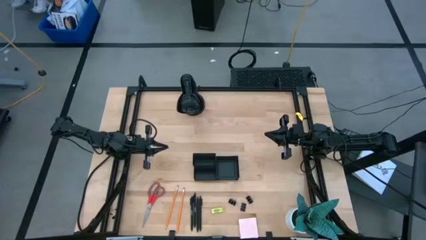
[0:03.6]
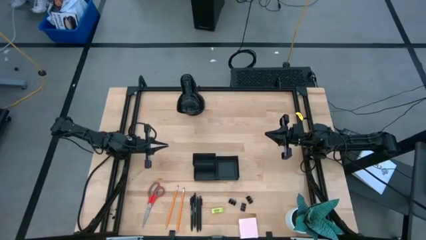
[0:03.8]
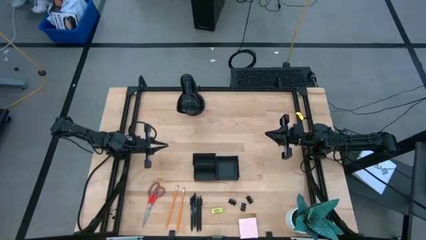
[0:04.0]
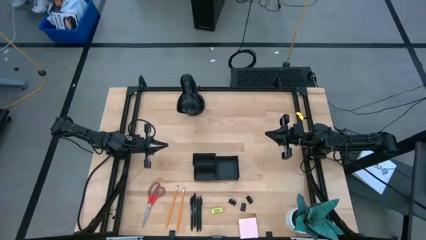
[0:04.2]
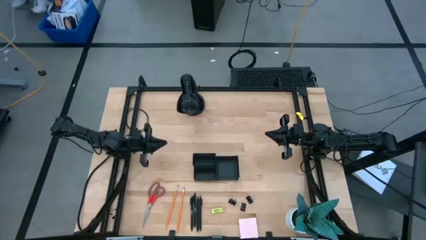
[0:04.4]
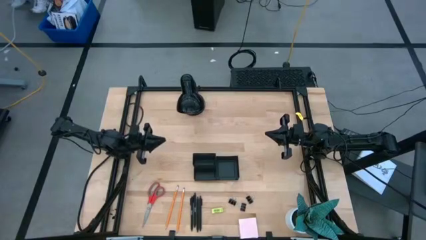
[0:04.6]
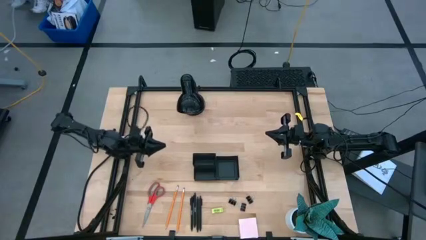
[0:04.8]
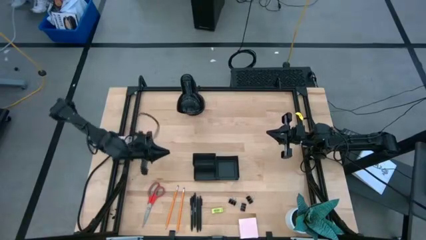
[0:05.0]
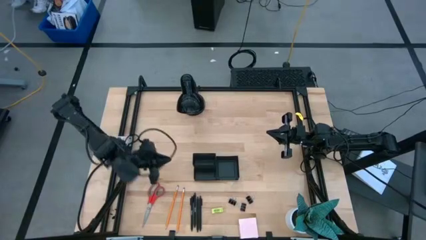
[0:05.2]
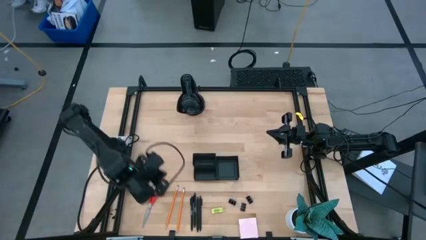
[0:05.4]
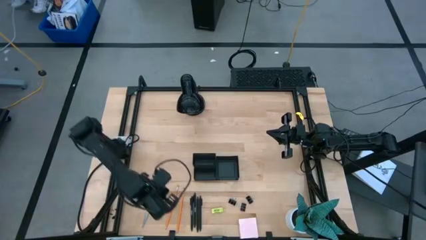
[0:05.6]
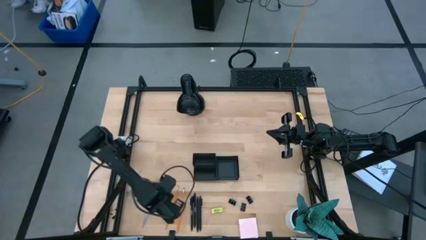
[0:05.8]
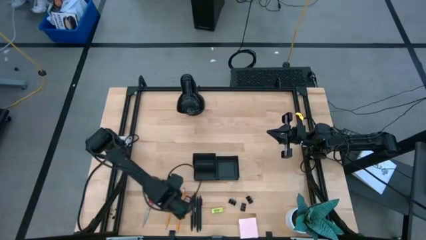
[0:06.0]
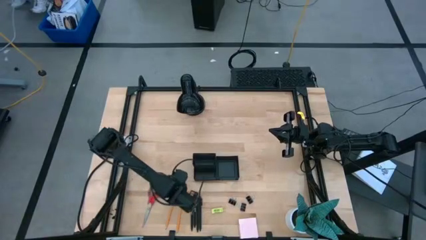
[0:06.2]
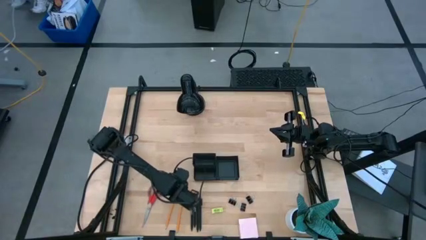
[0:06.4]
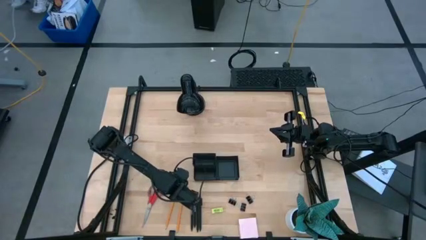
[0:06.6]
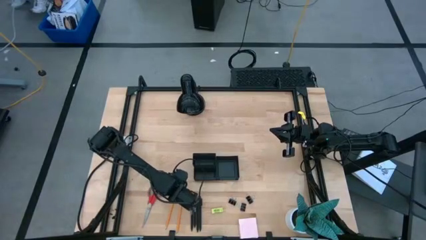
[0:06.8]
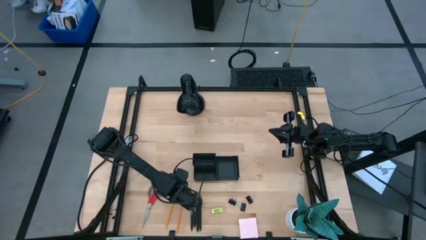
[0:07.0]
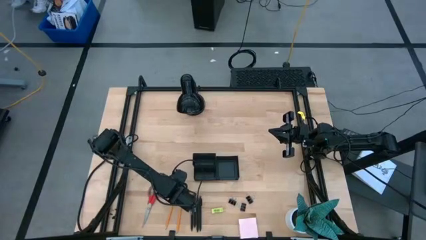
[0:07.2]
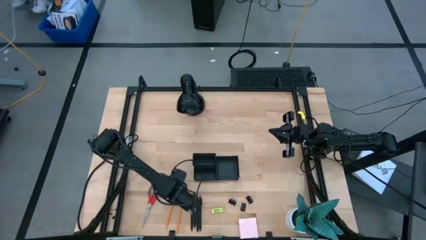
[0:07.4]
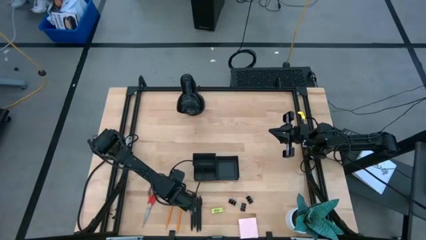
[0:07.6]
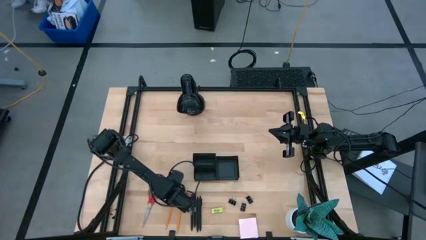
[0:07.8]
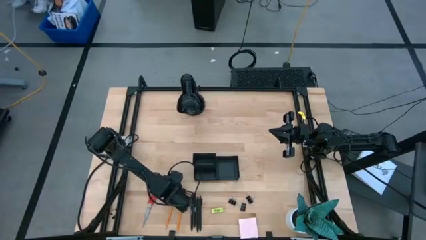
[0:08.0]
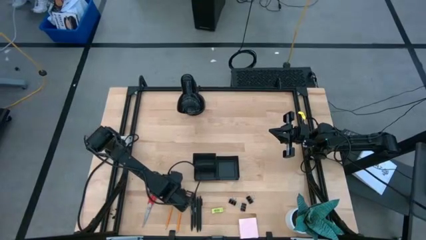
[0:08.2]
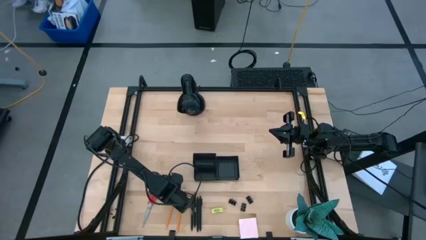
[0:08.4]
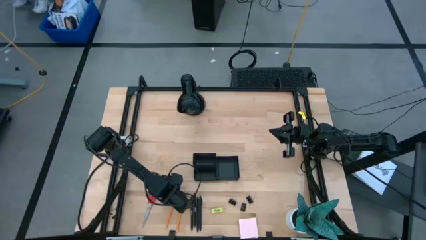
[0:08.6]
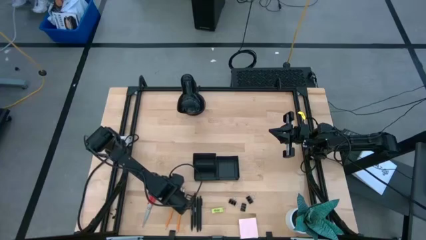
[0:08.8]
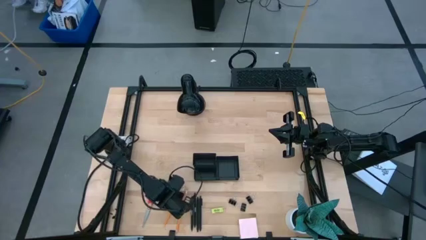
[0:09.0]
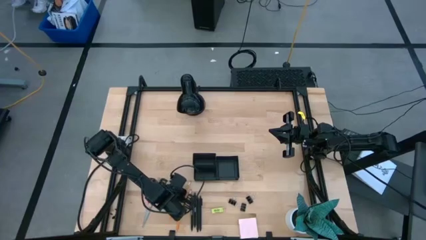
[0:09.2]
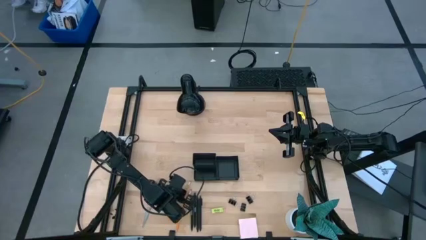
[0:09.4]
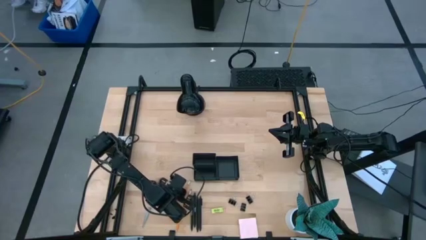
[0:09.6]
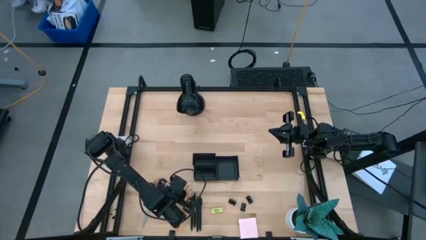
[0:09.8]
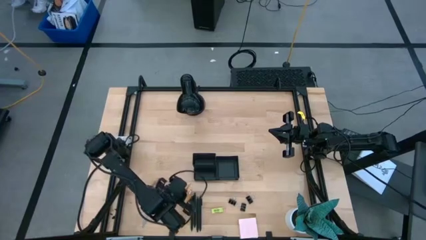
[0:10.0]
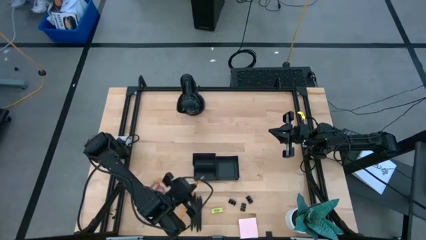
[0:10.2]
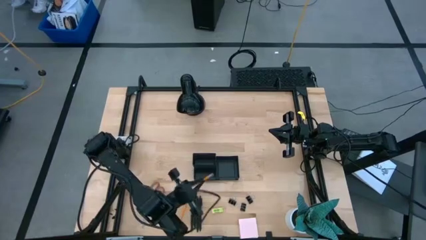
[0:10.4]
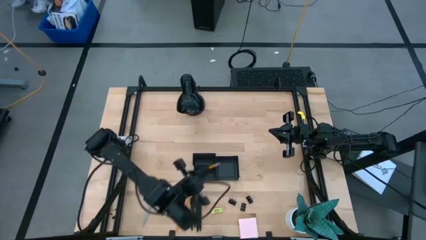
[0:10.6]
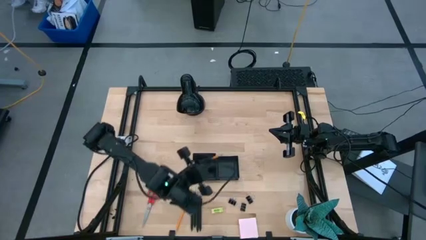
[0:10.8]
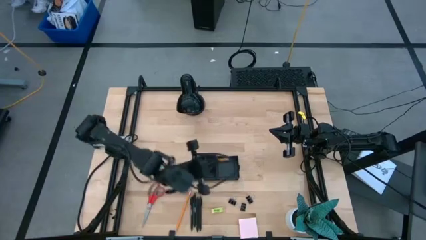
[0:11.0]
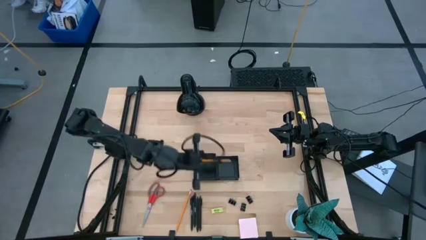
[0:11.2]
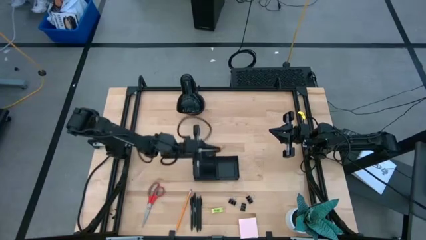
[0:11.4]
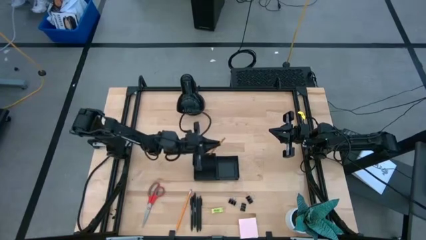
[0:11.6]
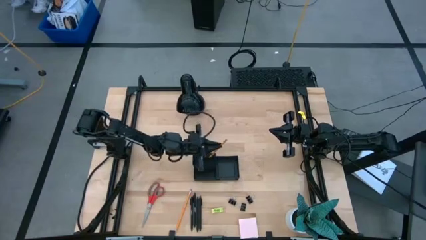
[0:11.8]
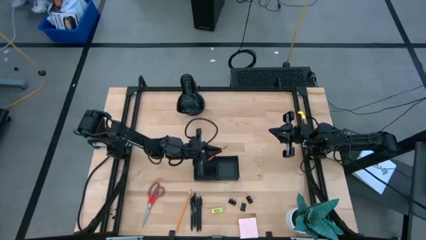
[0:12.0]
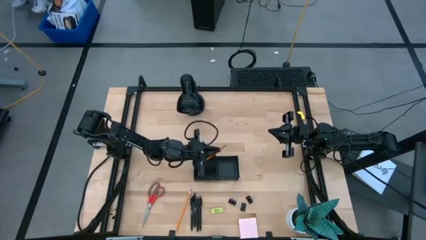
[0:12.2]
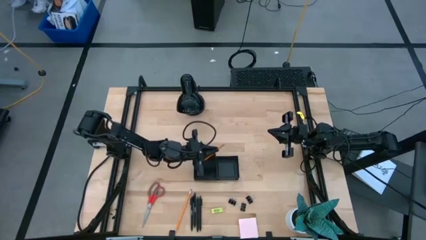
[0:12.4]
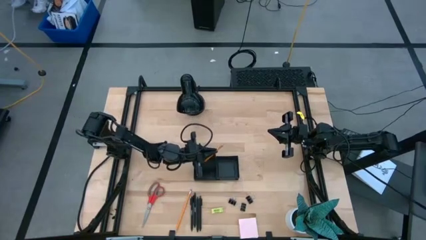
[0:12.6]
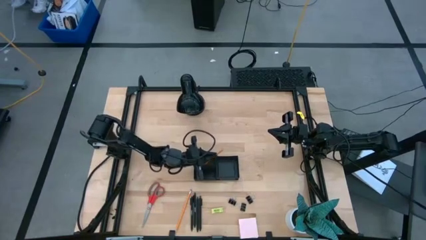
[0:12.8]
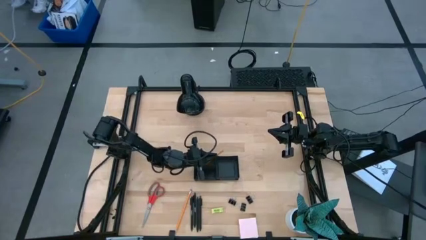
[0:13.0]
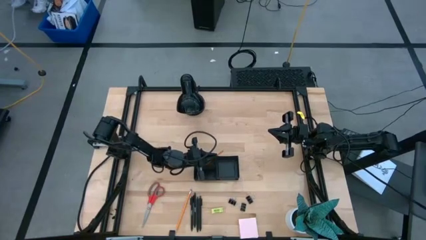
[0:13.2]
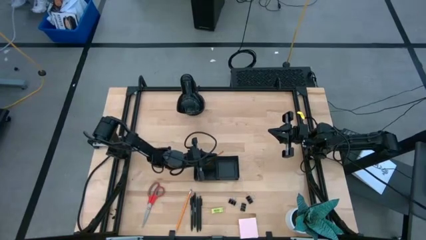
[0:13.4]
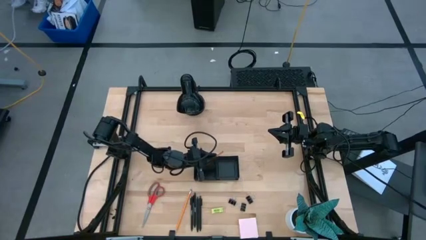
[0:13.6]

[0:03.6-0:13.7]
Task: Pick and place office supplies into organizer
Put the left orange pencil into the desk organizer

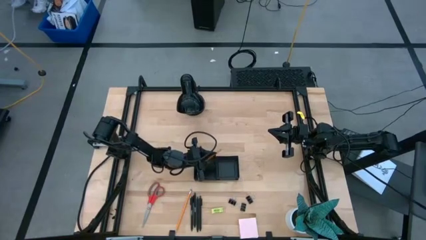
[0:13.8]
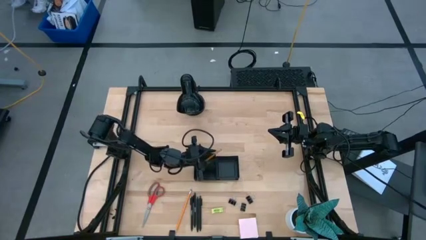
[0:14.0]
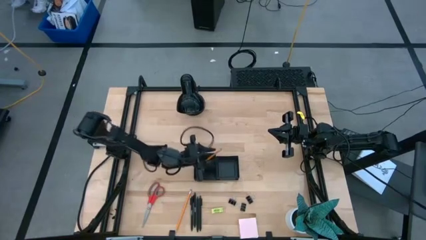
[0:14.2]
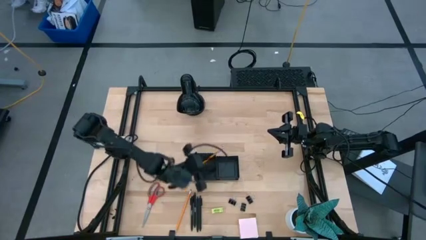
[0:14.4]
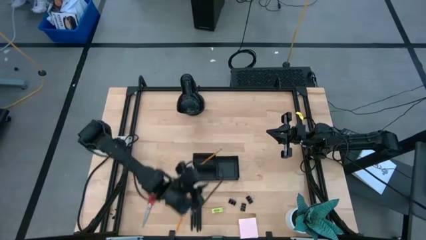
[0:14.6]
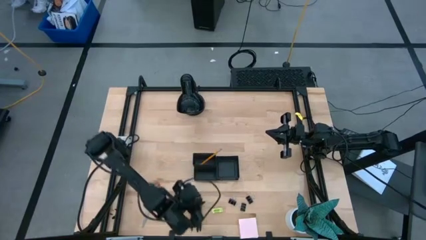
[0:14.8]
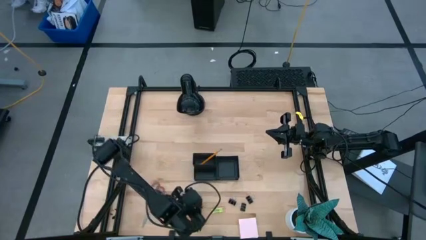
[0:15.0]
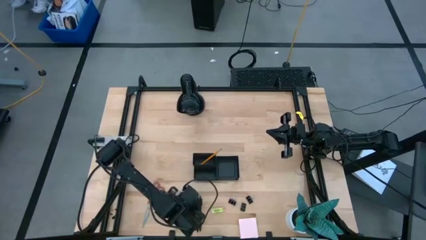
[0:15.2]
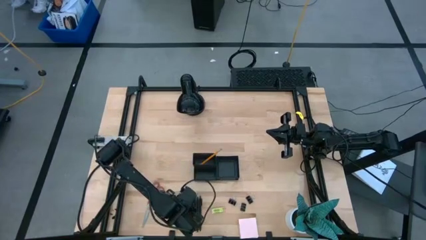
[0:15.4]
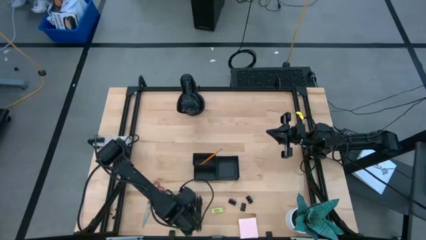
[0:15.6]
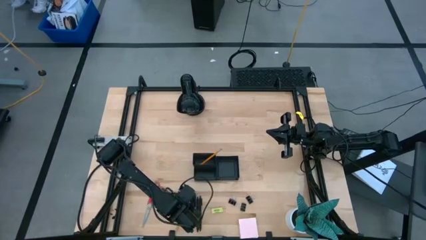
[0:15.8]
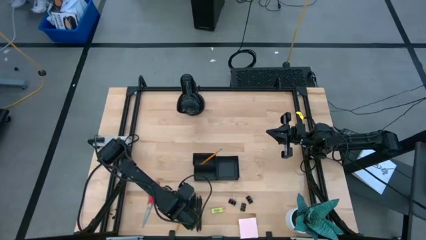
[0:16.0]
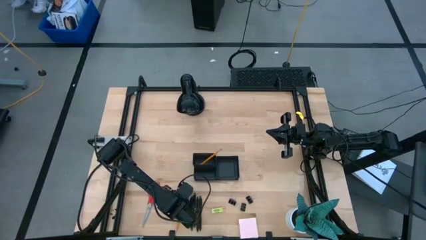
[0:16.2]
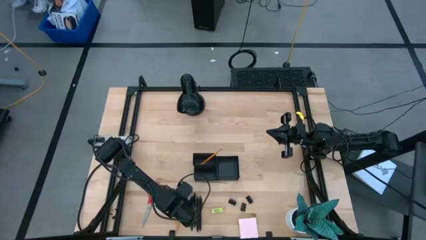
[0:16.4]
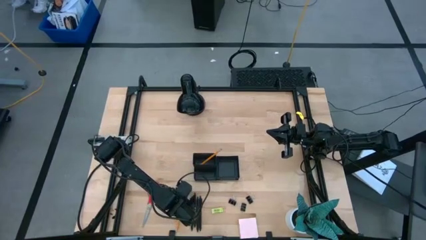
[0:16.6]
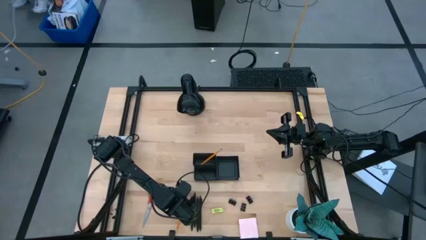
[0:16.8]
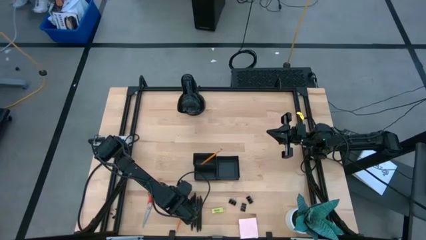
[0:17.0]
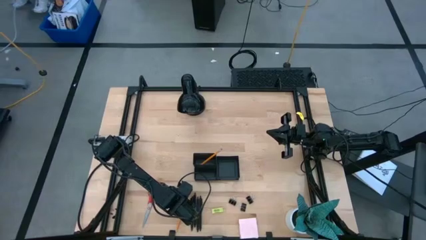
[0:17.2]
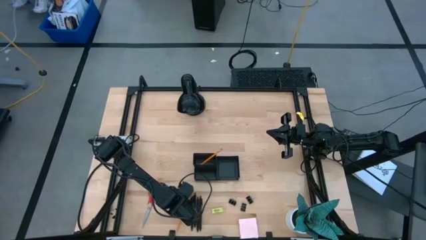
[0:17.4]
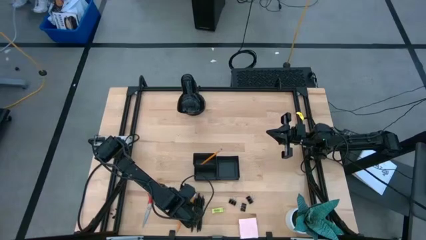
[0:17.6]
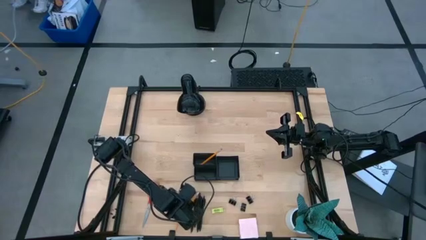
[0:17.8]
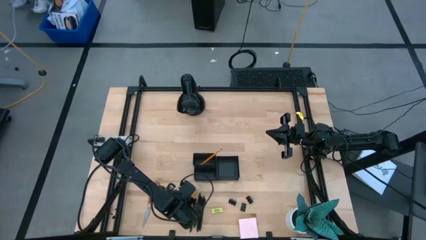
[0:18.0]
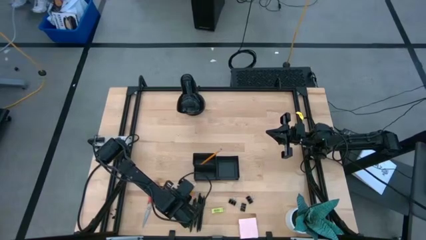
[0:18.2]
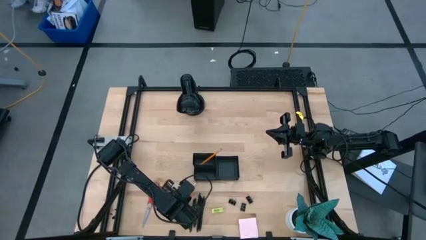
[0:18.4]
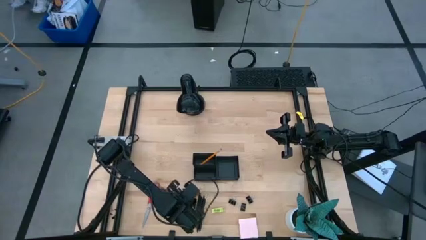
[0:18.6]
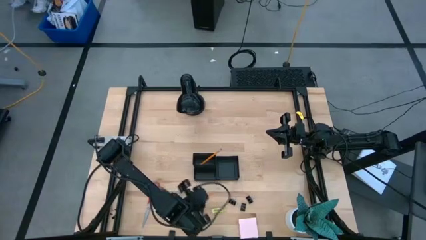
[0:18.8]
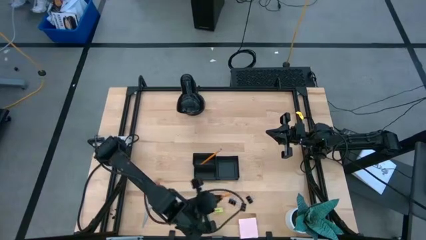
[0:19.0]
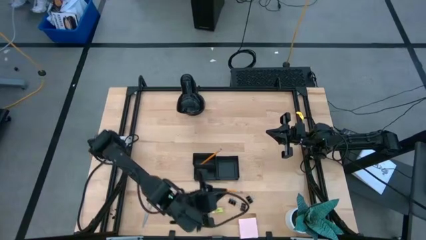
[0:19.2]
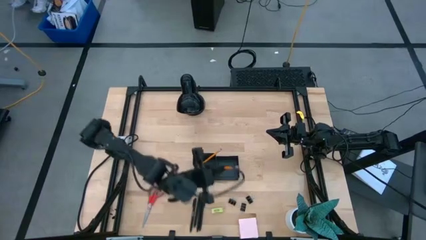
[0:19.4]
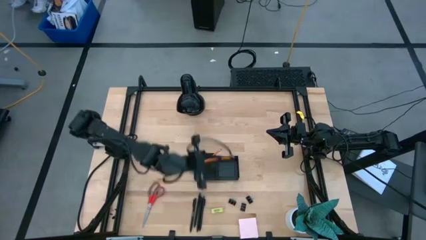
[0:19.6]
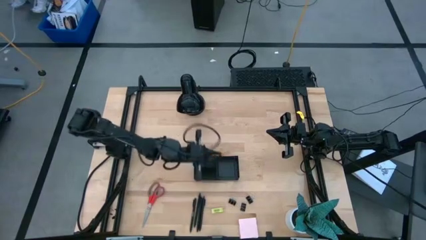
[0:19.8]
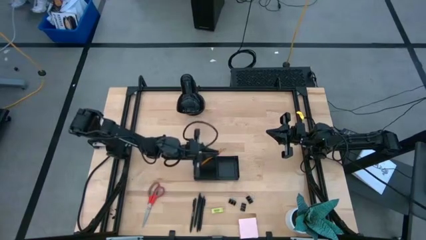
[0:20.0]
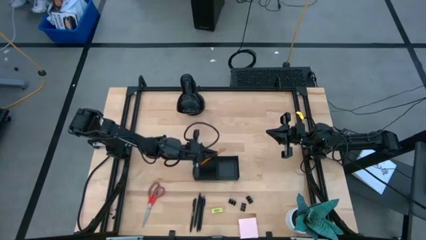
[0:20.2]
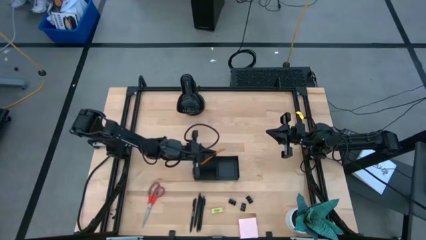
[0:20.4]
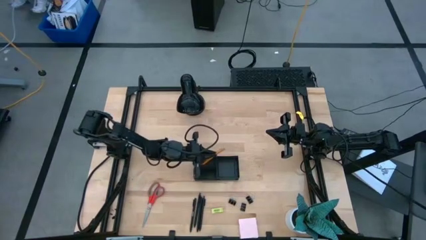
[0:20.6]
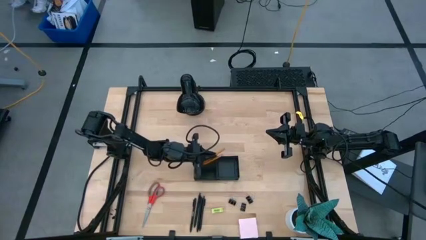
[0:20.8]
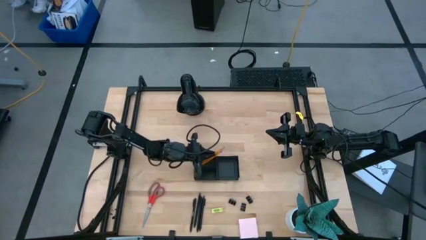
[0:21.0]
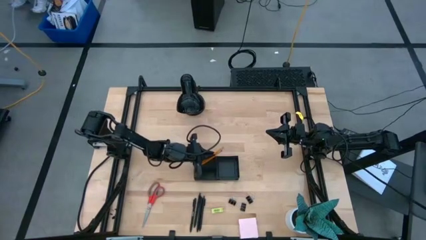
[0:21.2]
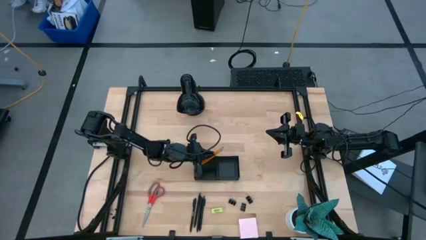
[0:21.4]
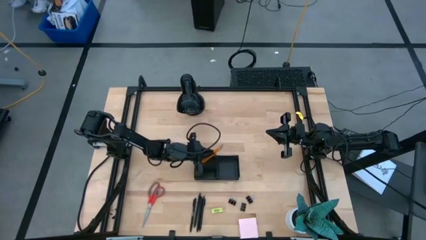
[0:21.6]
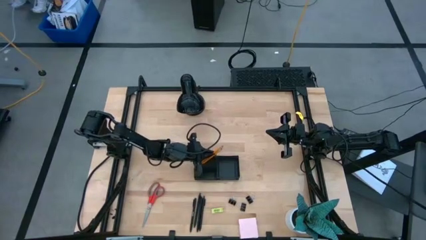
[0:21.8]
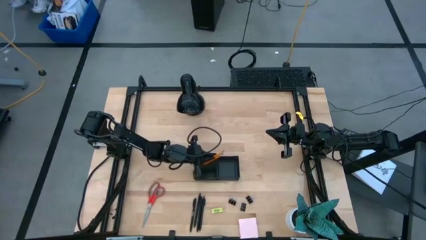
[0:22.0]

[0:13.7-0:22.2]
Put the orange pencil into the desk organizer
